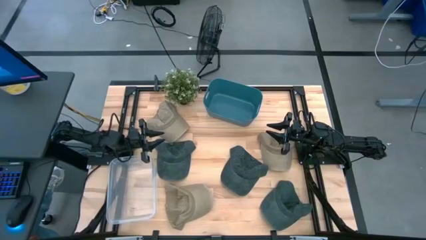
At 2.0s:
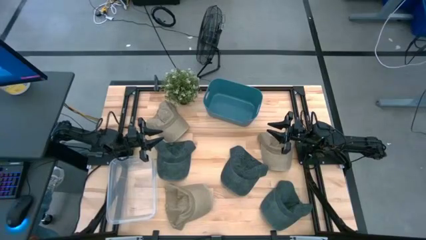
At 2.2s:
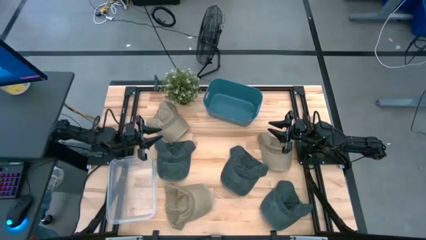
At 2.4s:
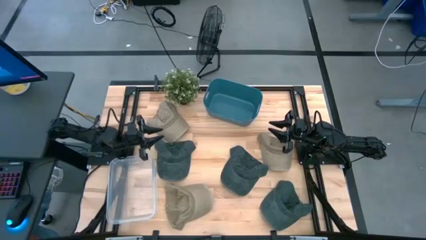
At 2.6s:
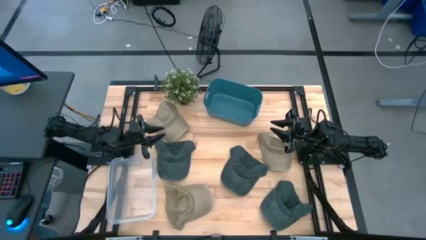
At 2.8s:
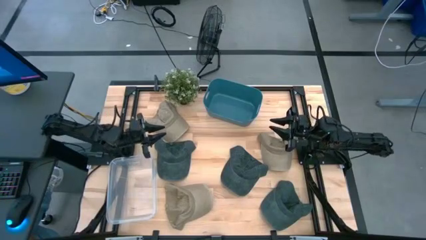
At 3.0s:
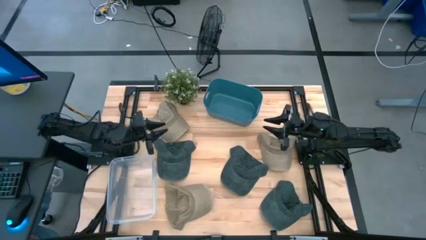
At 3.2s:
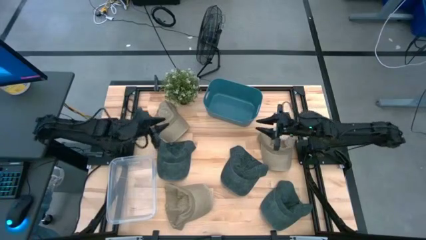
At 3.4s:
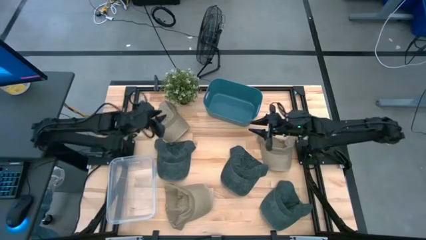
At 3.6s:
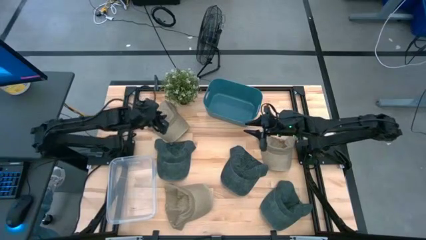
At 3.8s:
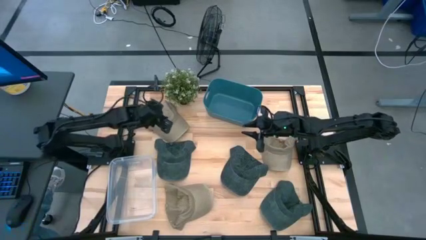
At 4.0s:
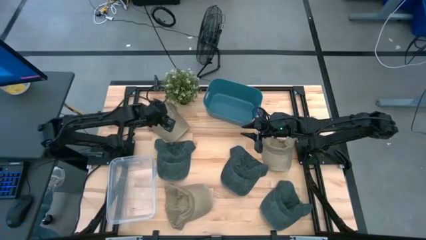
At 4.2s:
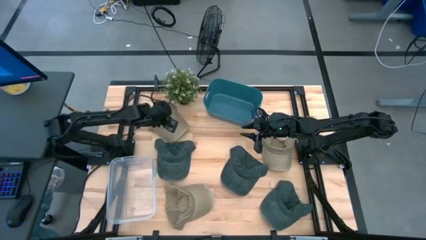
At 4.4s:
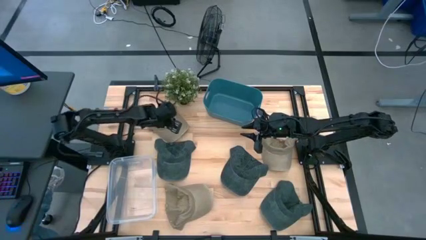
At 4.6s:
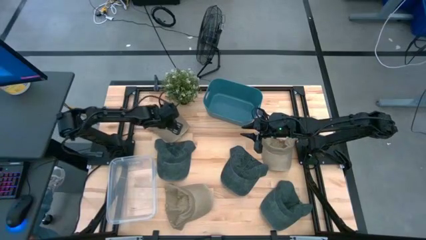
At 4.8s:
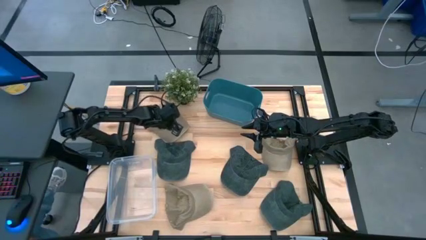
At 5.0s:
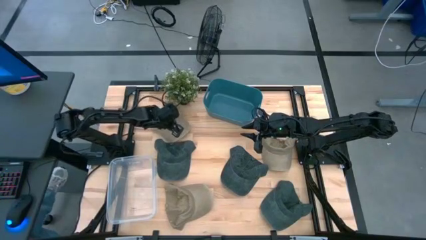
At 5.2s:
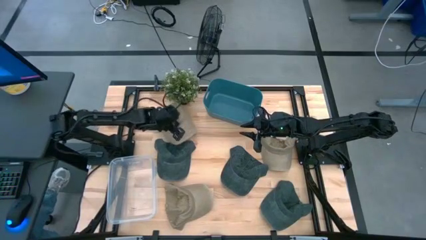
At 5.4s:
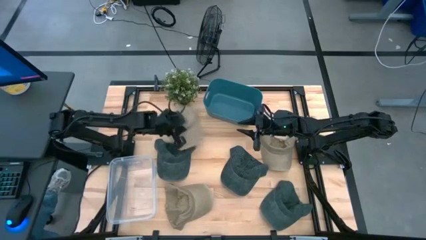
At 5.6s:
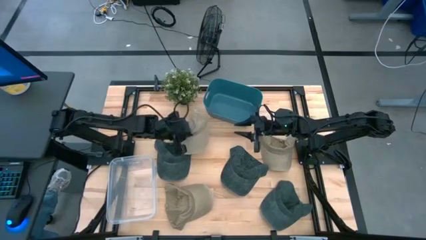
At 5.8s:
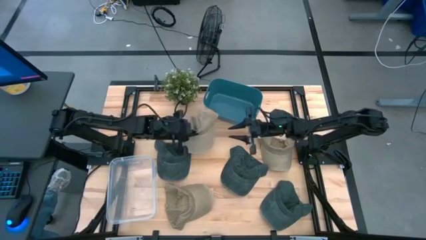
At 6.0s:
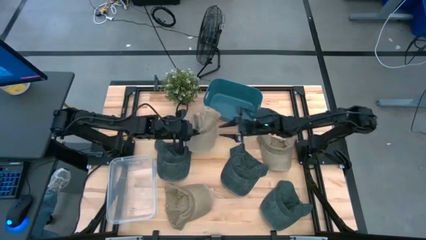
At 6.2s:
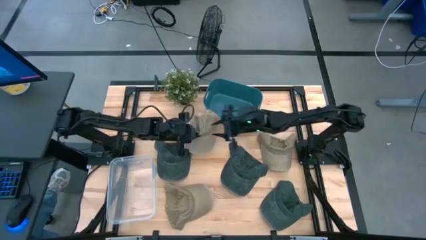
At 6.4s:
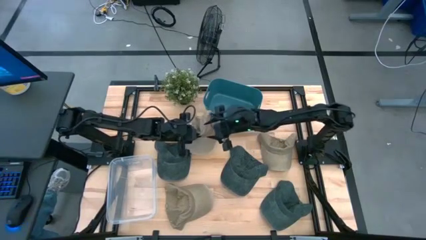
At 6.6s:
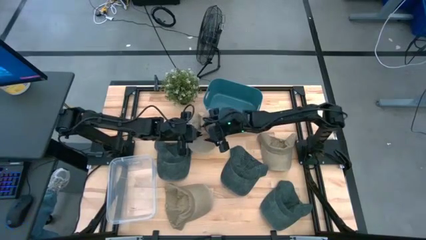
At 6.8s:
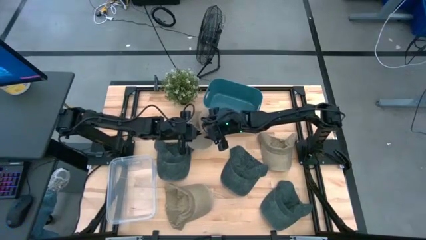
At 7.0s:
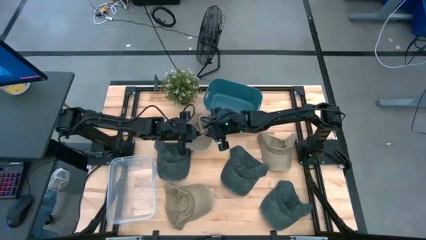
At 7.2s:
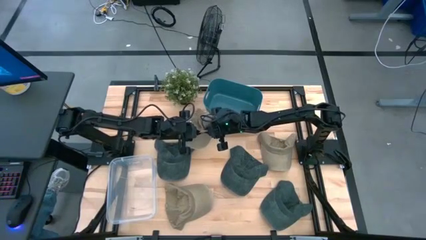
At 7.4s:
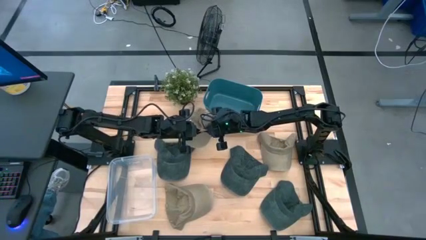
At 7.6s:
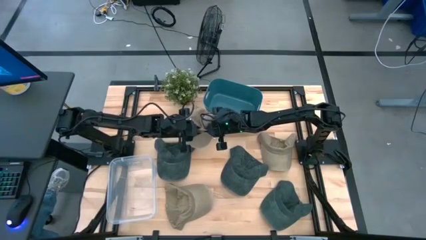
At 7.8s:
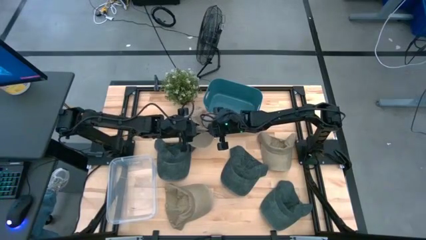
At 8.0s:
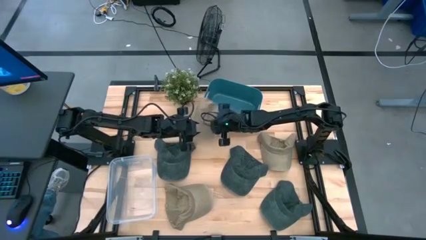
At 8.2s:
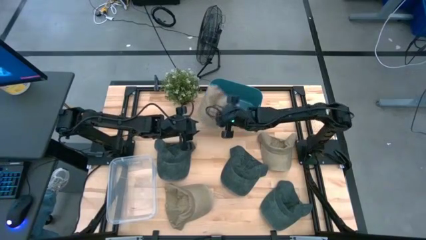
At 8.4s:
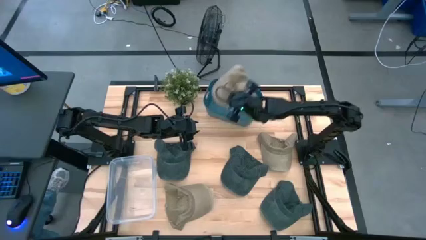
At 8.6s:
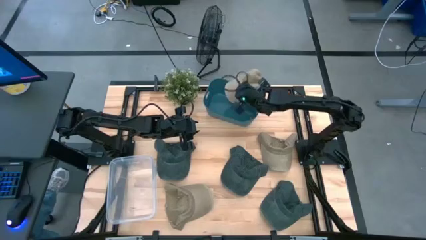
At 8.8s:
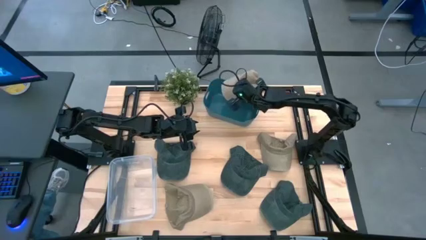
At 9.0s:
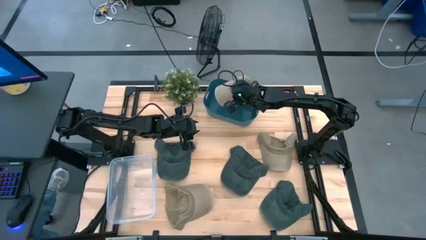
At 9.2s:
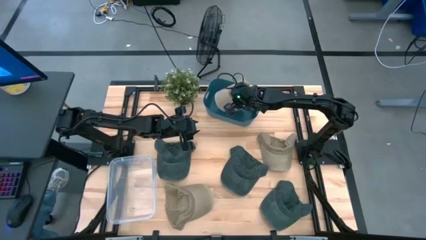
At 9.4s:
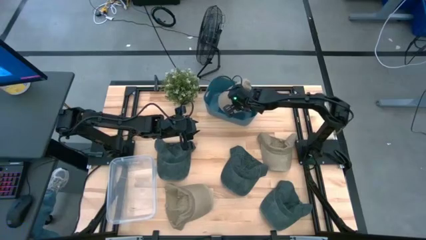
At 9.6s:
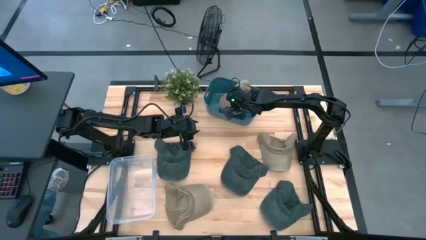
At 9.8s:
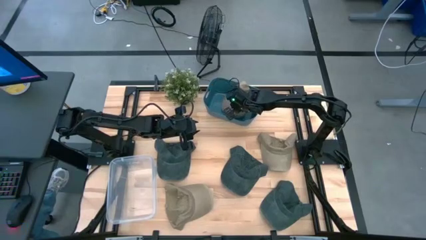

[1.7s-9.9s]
Task: Pick & Place hat
Put the top left brown cap into the blue bin

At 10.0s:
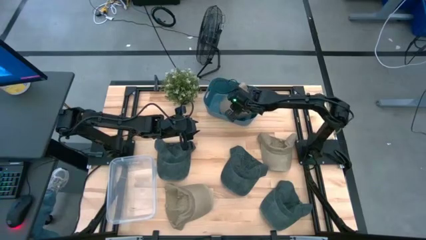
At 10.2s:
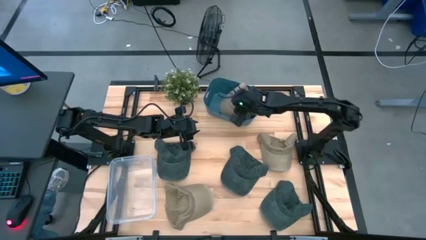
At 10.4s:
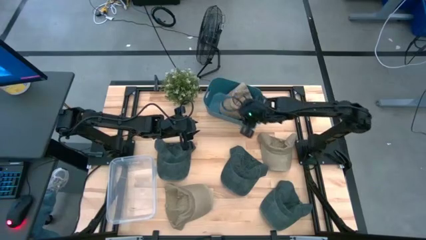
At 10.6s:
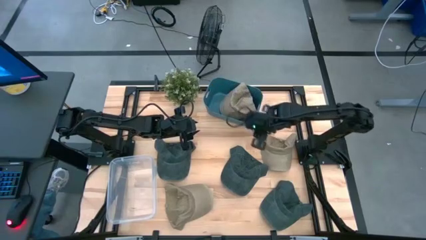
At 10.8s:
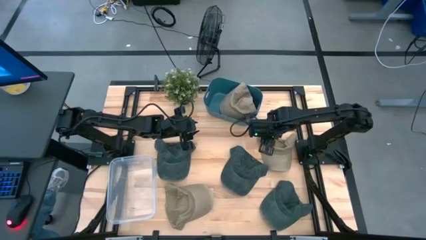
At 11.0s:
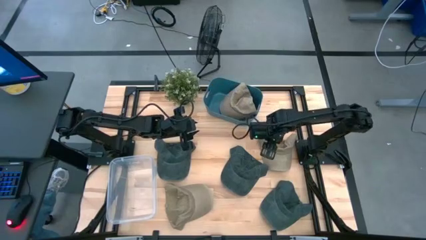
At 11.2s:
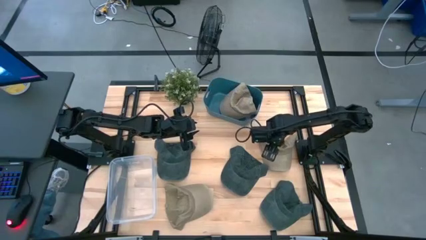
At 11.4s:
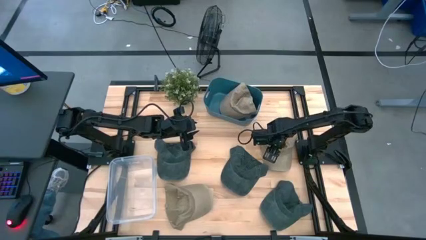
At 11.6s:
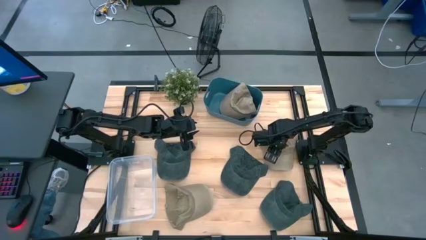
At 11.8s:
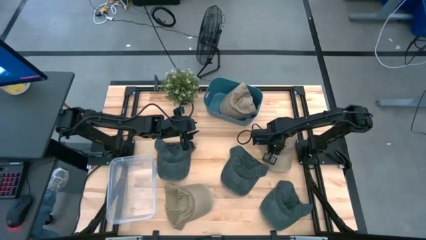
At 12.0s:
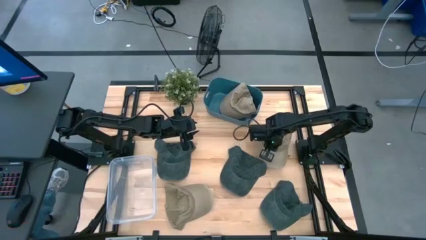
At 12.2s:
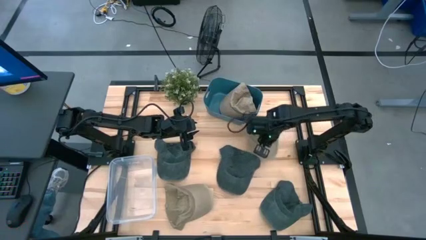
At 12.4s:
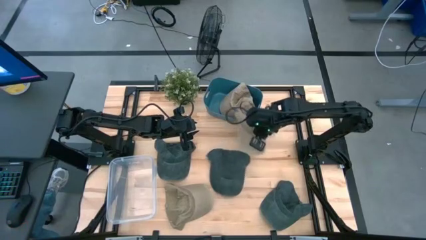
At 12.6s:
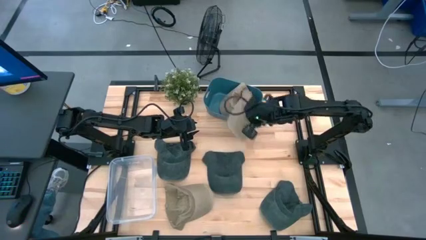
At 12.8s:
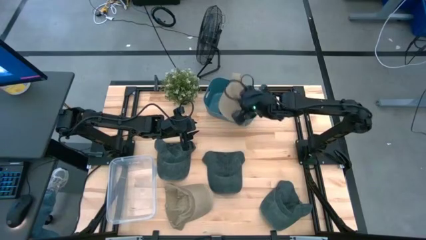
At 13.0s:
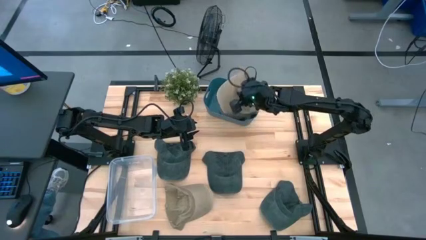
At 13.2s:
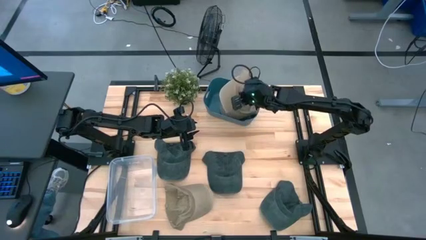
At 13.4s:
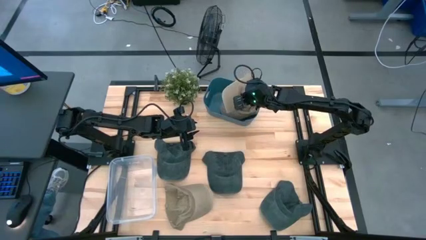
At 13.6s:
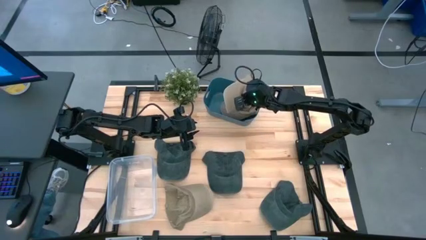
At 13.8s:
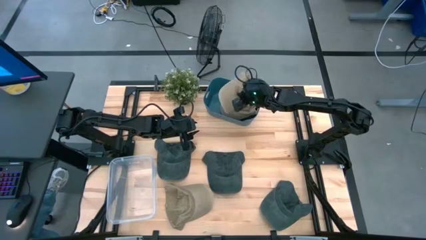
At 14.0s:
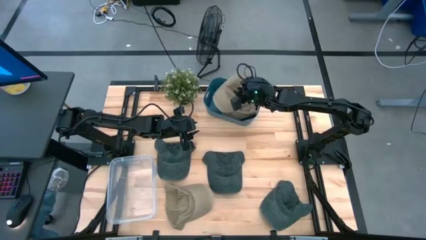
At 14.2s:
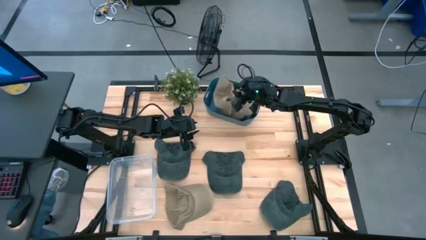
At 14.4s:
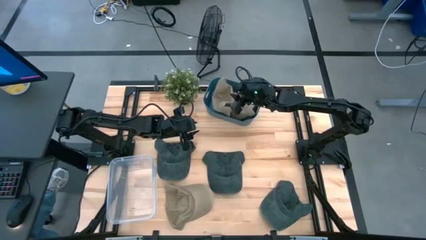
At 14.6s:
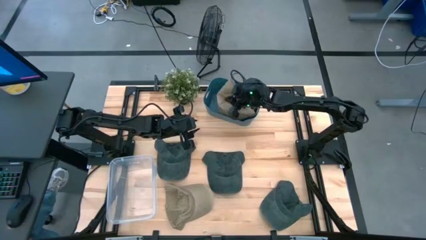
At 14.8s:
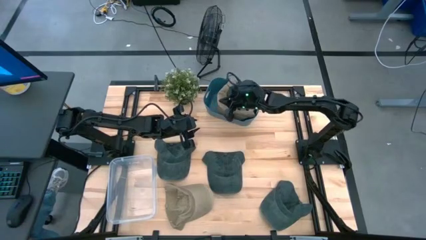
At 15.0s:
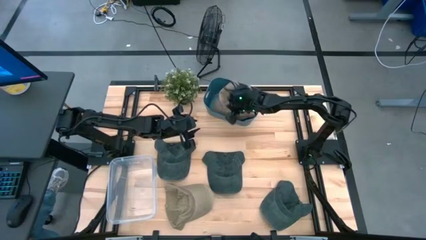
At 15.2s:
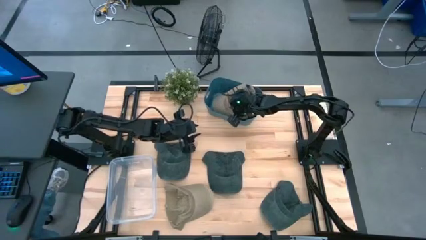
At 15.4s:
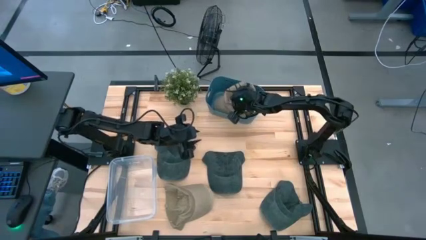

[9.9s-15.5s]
Put the right brown cap into the blue bin

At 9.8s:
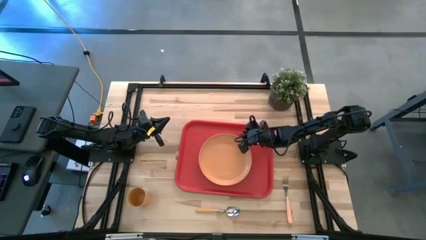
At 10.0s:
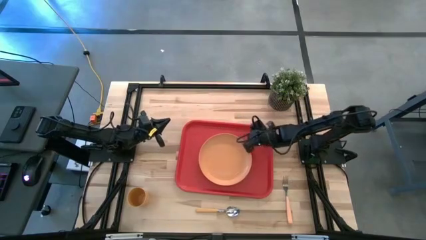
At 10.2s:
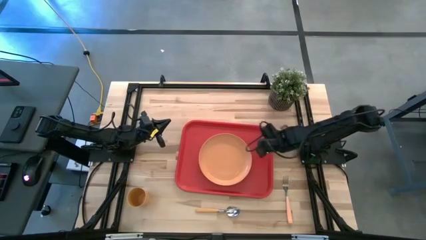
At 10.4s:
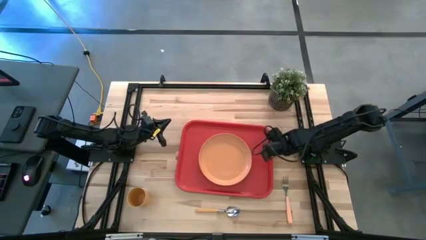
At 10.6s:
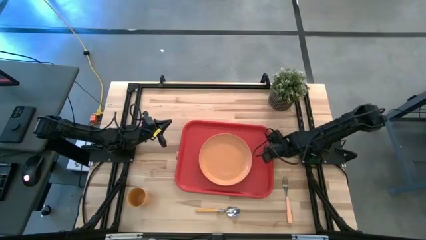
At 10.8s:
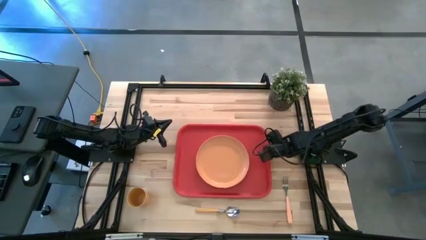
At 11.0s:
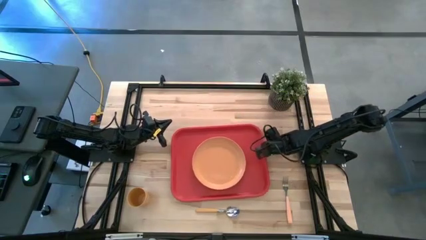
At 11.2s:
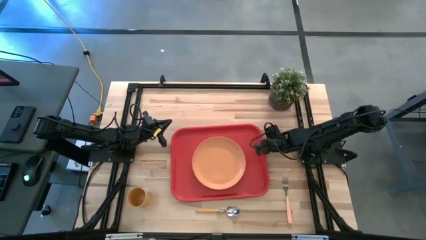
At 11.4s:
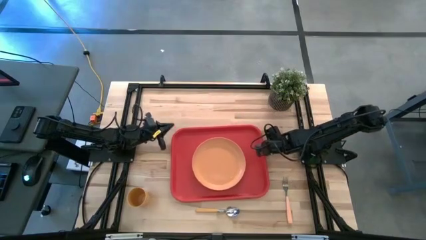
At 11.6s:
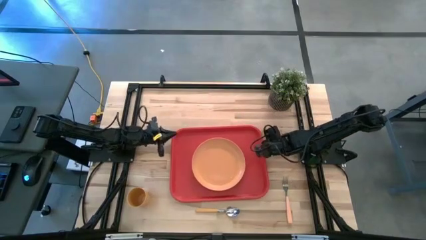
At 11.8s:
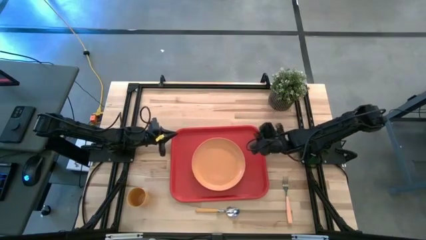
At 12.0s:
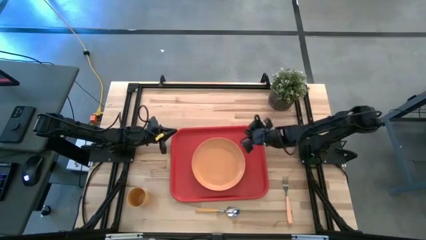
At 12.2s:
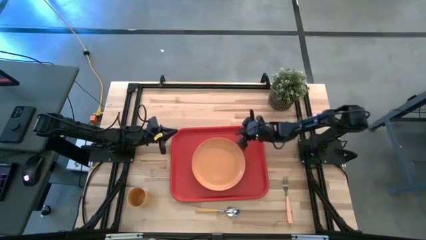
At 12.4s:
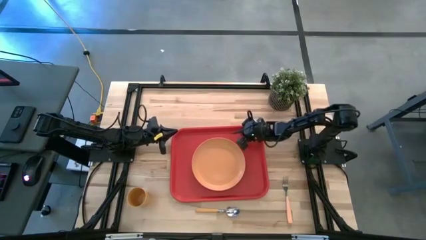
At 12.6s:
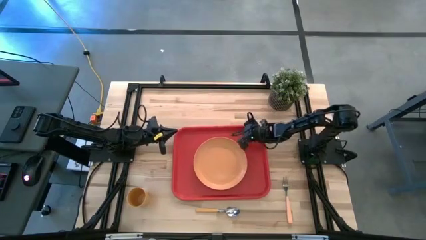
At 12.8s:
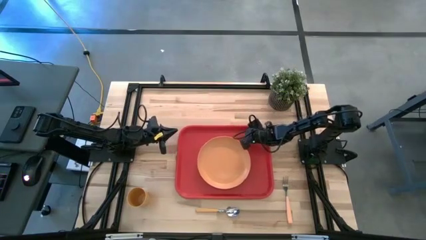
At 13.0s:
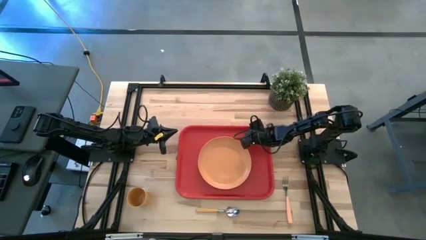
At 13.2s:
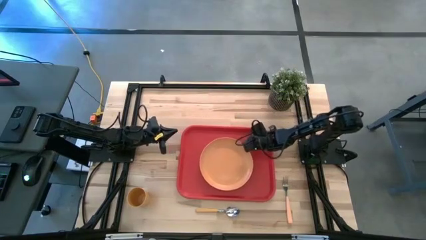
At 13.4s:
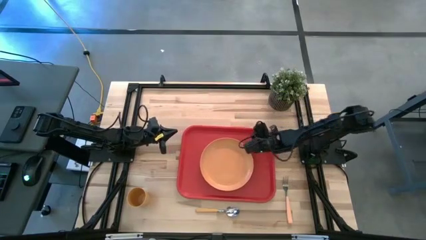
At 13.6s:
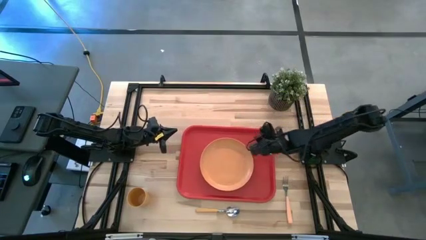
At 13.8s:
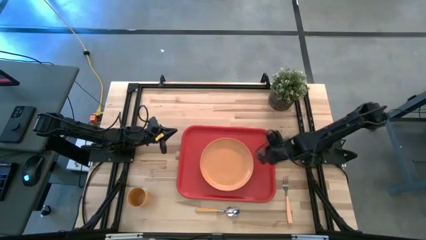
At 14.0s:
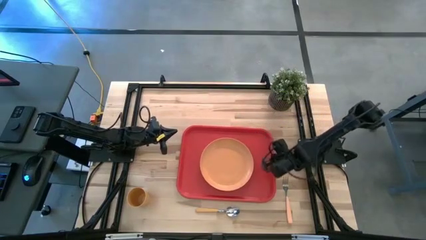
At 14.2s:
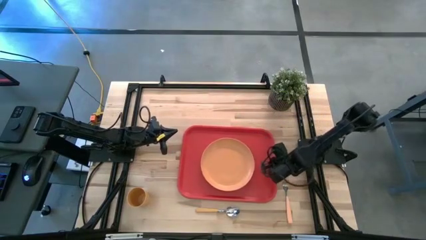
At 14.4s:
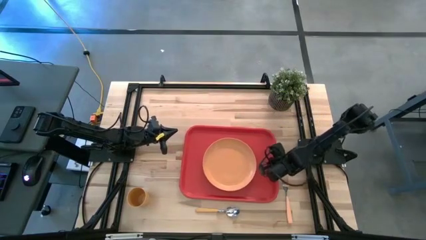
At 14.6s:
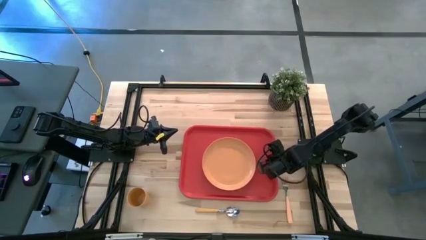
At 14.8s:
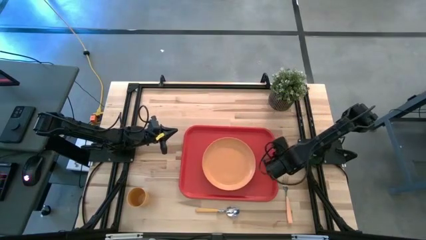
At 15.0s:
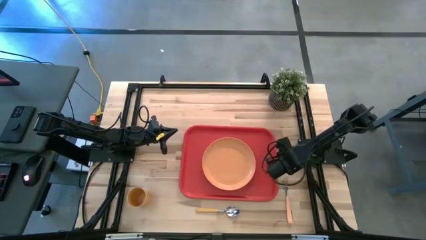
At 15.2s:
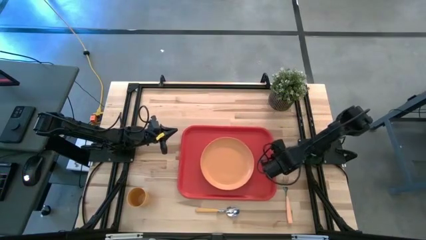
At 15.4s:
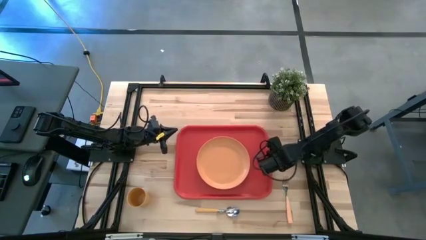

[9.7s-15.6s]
Task: Pick and place plate/cup/fork/spoon on tray
Adjust the red serving tray
